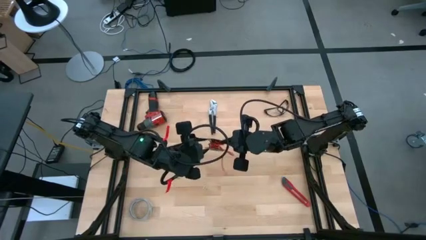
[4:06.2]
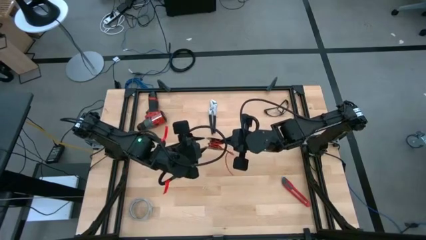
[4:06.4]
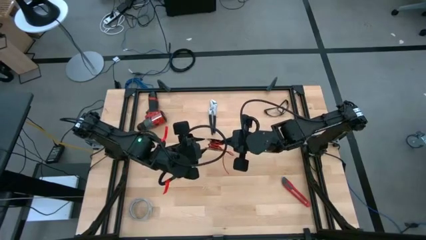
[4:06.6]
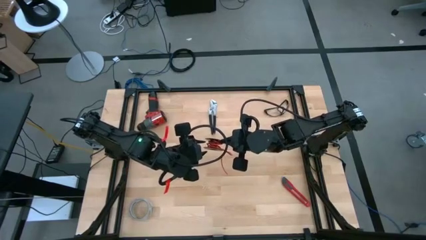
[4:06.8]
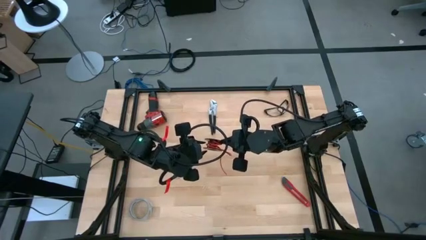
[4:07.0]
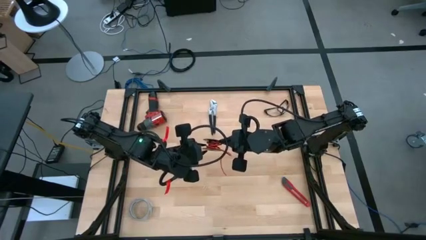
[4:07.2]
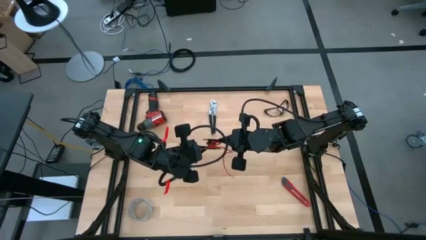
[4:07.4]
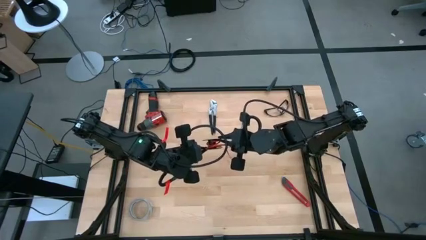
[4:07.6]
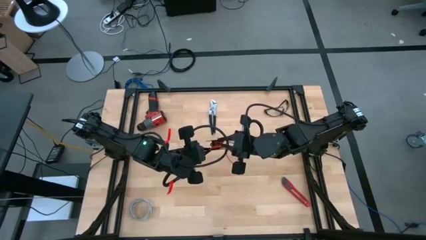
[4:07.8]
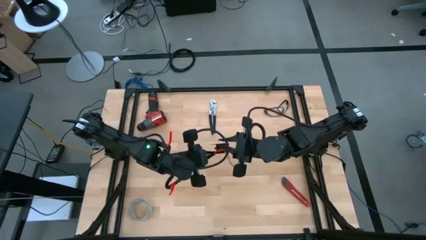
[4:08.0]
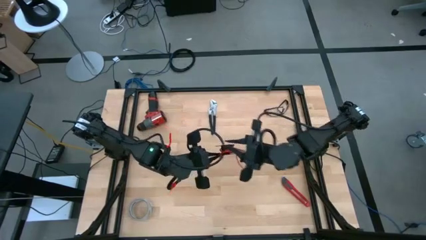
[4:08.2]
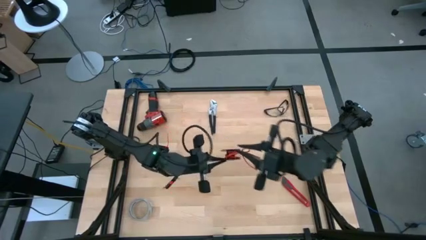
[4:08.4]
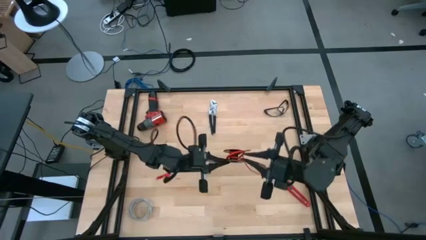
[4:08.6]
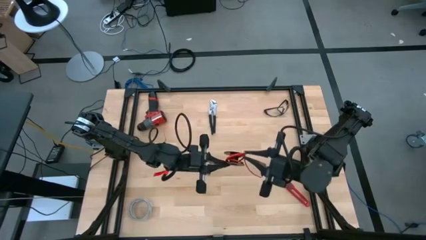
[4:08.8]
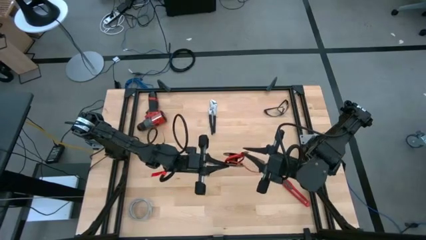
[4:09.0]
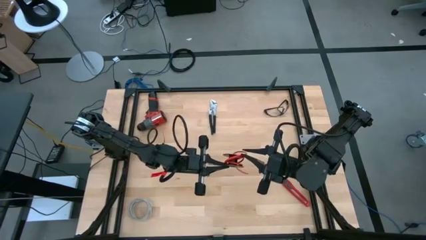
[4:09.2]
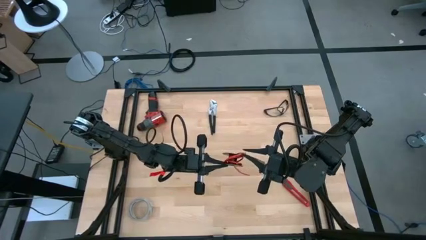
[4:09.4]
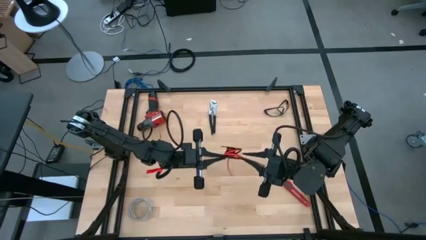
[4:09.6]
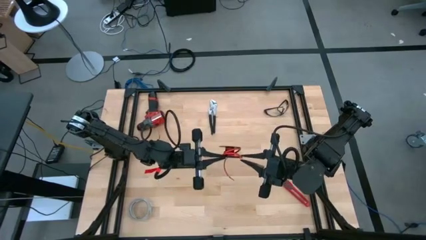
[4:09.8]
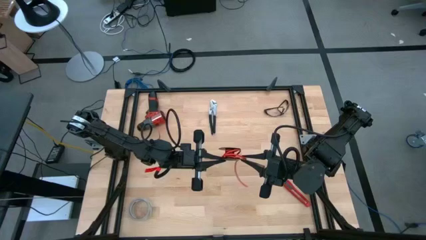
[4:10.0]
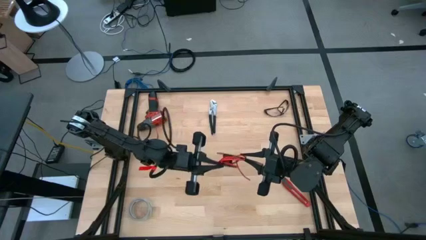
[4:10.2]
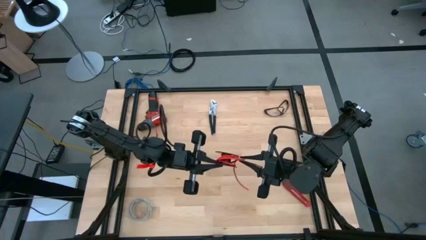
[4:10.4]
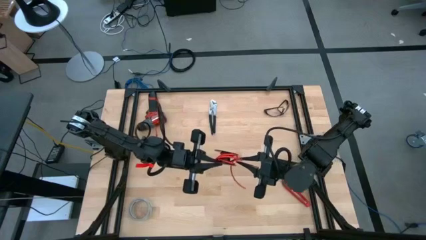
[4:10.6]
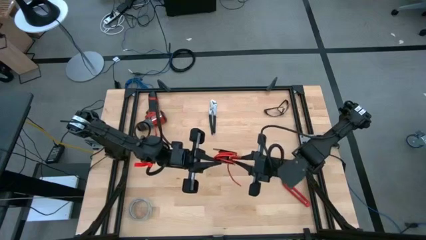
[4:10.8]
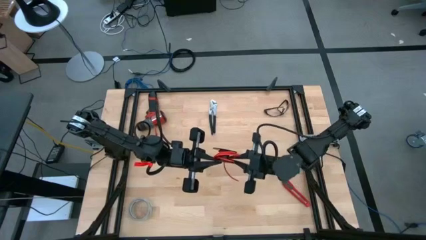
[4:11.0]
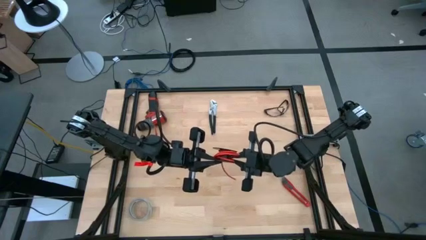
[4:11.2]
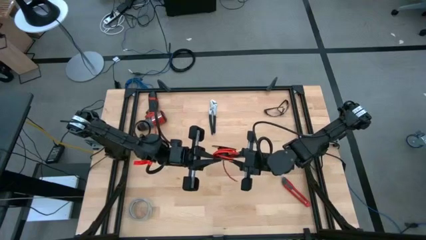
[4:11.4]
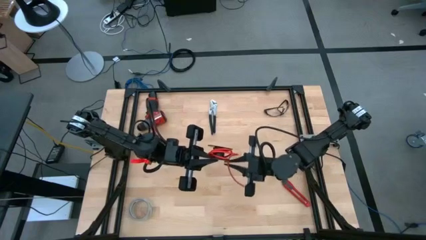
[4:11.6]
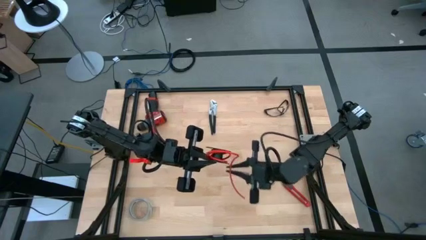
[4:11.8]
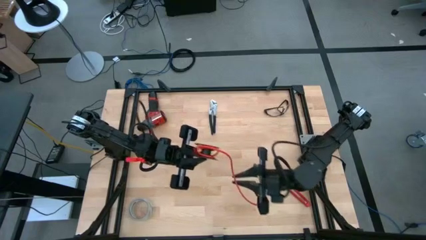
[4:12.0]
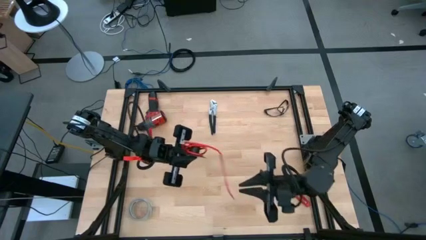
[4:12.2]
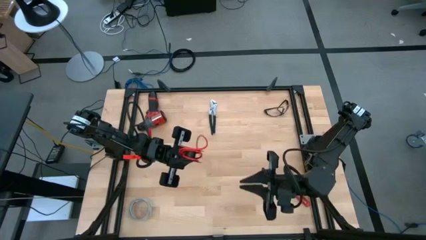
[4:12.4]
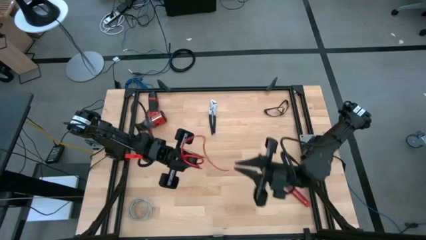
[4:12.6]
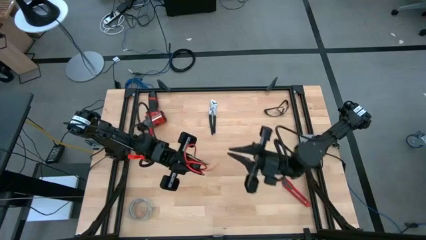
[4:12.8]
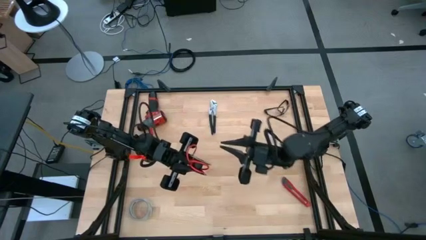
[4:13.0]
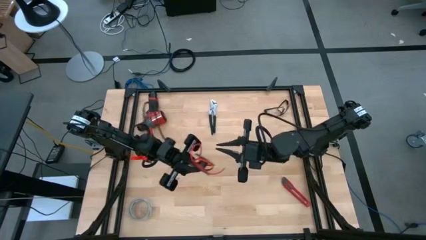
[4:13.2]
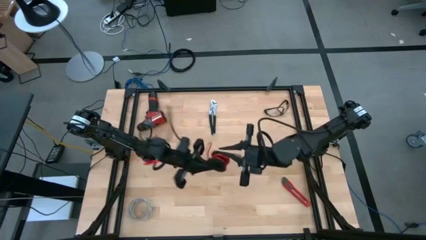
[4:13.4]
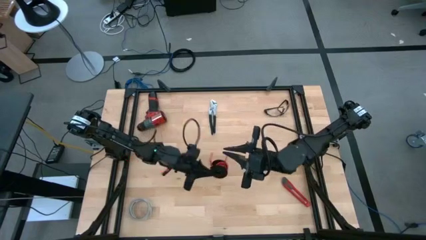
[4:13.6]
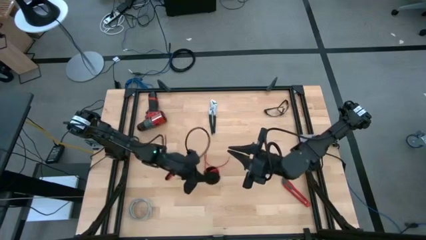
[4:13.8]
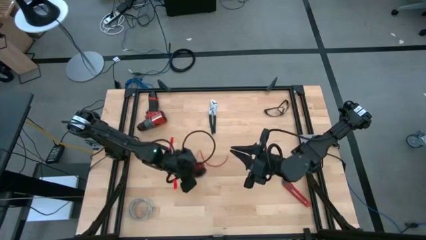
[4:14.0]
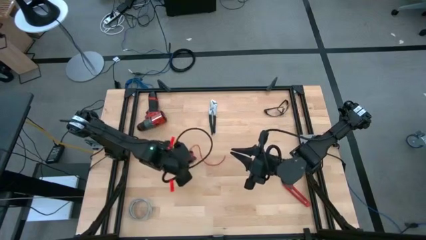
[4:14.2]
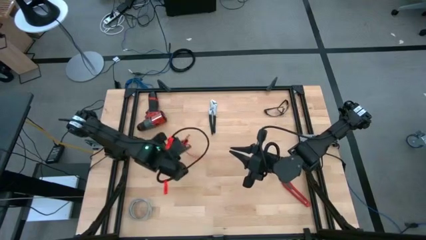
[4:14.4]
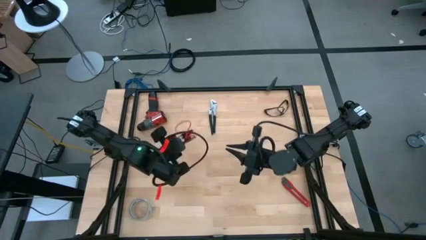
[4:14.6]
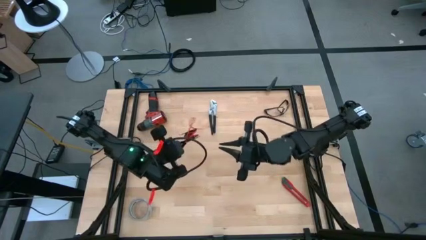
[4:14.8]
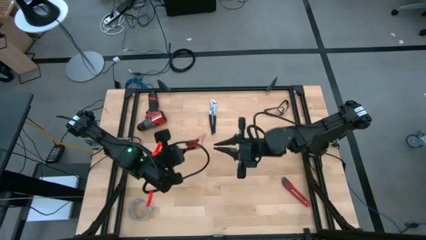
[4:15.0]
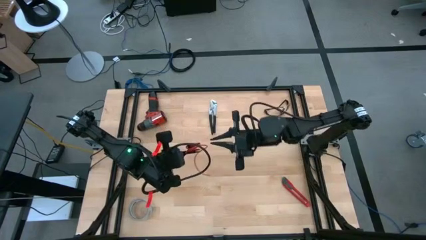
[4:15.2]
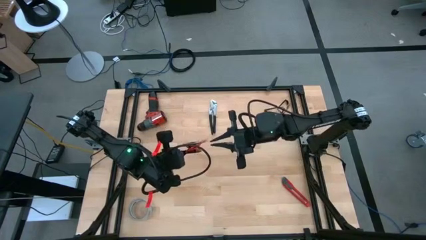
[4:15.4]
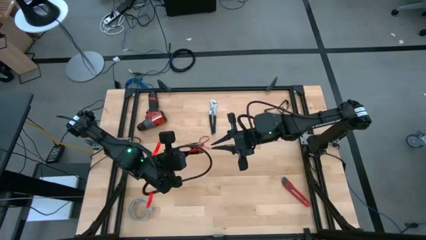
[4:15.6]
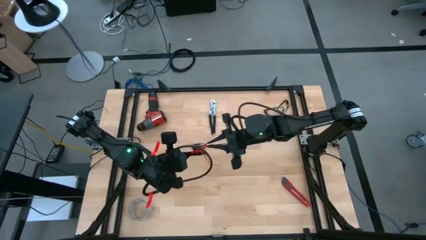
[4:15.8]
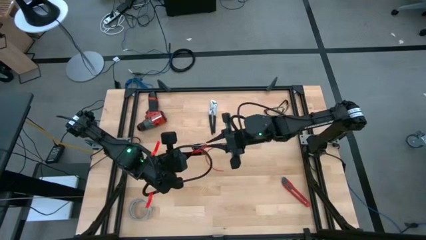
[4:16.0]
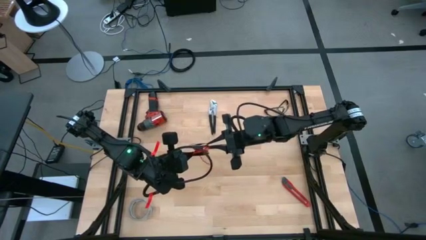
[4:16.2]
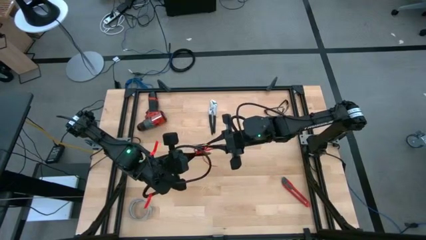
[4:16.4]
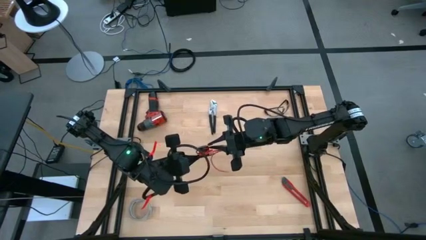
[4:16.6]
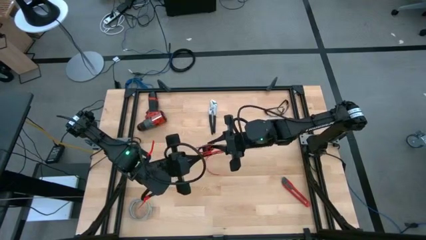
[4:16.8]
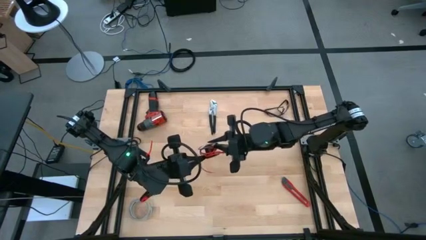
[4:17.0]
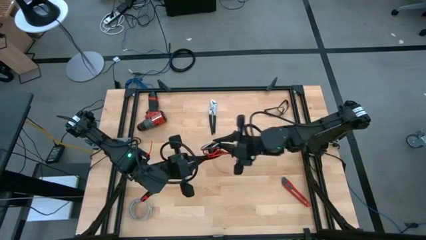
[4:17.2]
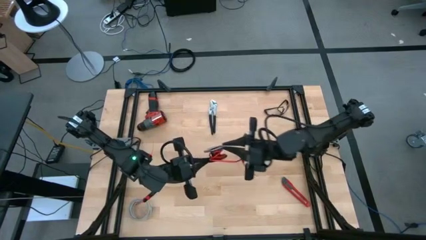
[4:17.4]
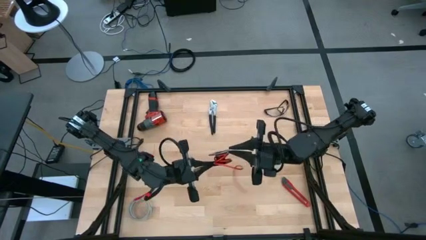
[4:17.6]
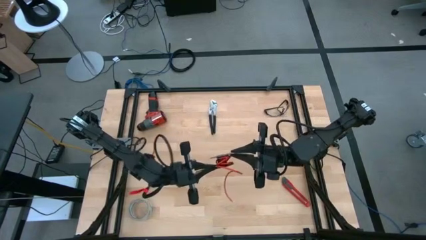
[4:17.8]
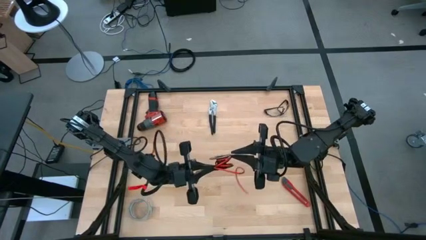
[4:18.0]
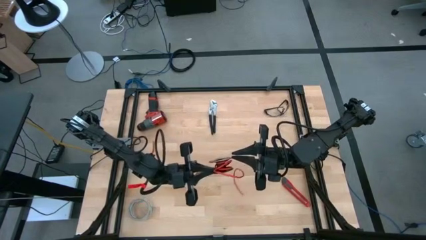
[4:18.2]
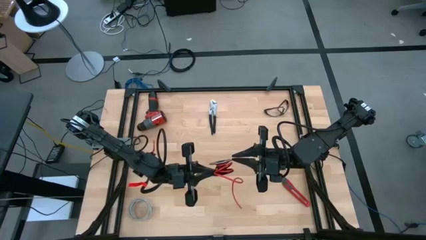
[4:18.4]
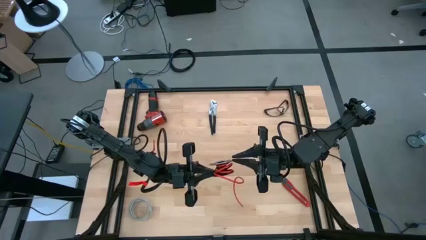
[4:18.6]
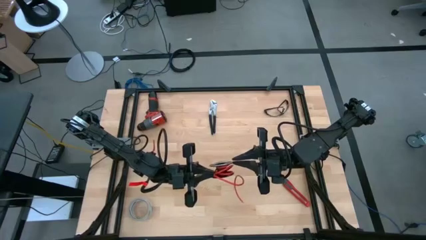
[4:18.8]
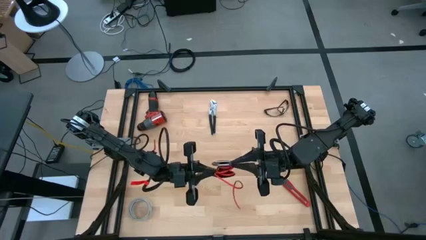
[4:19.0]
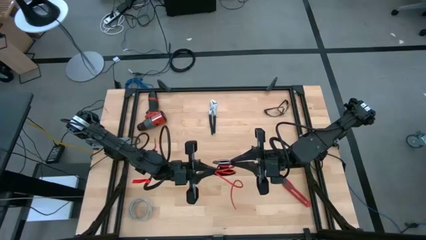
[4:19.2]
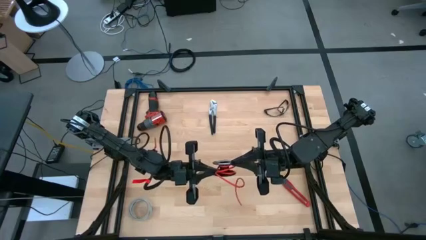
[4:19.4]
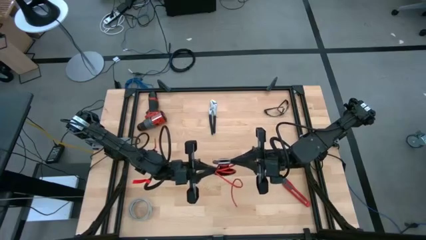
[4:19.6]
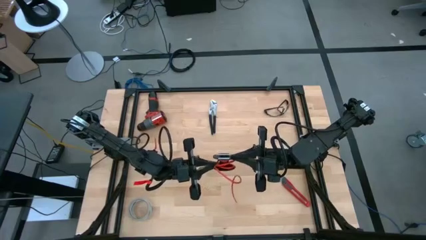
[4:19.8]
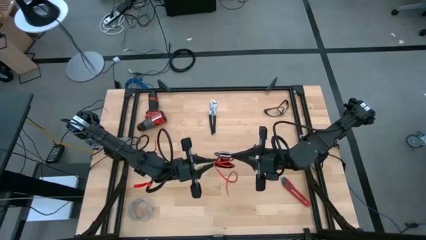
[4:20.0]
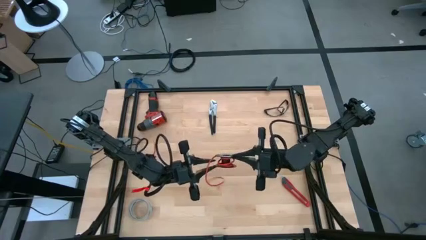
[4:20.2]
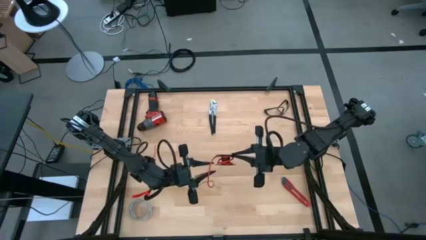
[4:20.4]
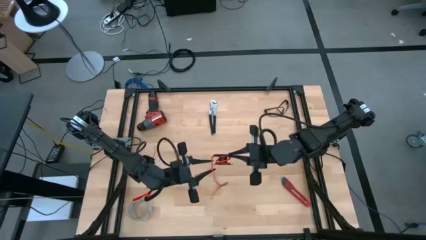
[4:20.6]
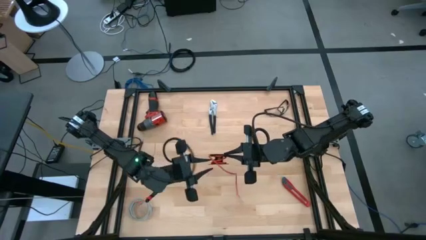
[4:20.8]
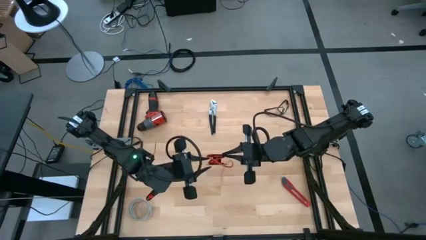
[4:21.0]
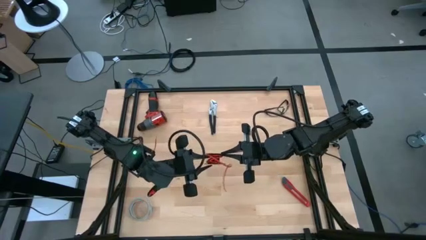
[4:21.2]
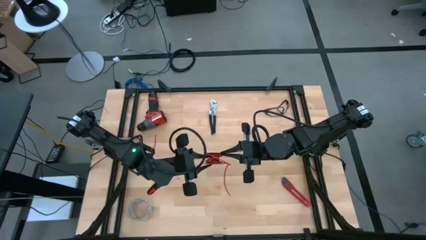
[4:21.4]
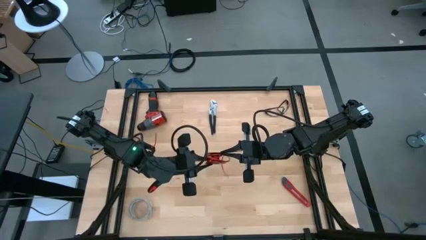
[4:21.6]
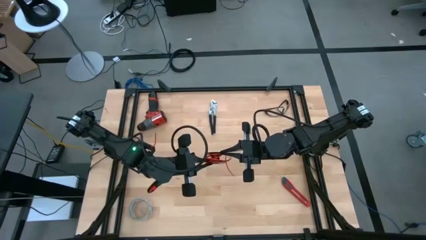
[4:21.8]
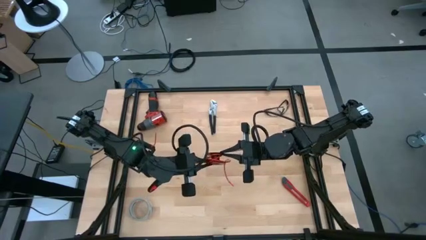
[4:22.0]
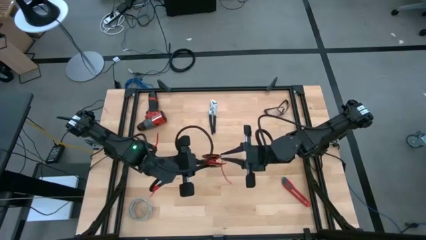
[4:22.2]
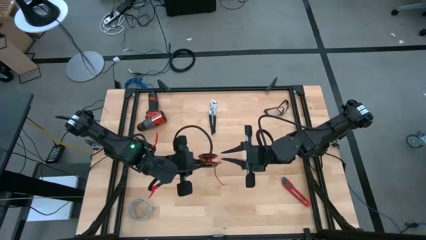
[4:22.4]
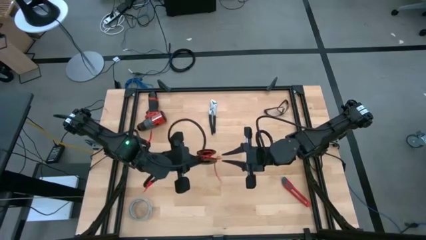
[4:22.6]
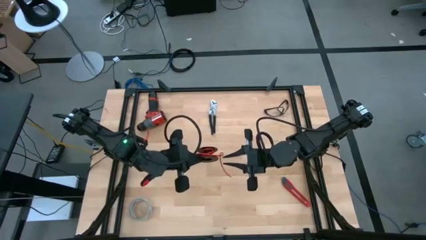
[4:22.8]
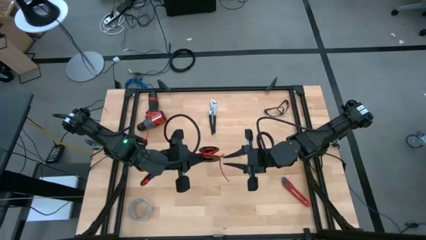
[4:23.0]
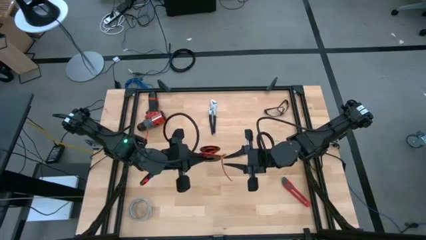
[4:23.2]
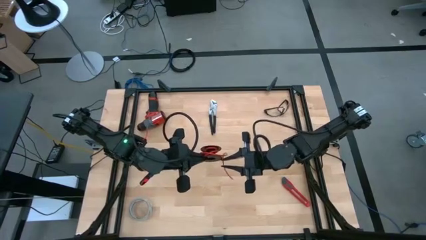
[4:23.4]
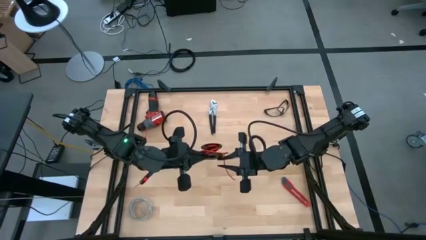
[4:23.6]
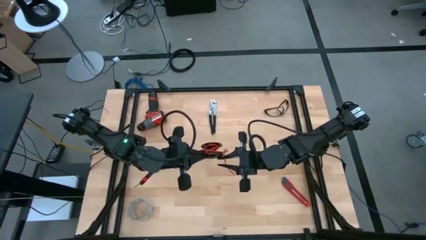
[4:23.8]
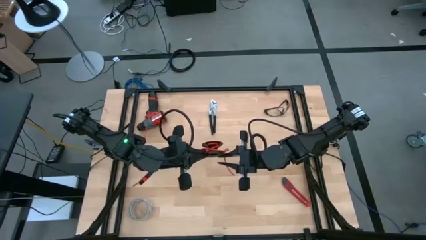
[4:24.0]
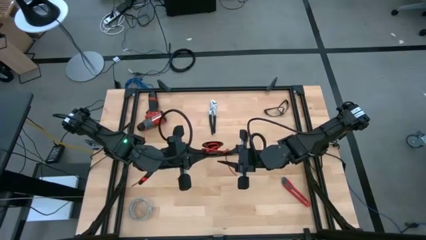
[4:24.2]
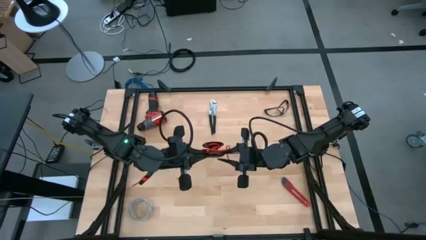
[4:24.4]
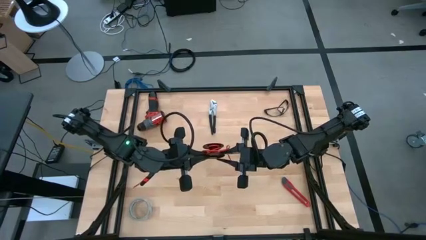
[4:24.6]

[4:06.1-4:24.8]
Task: Coil cords
Coil the red wire onto the black spool
